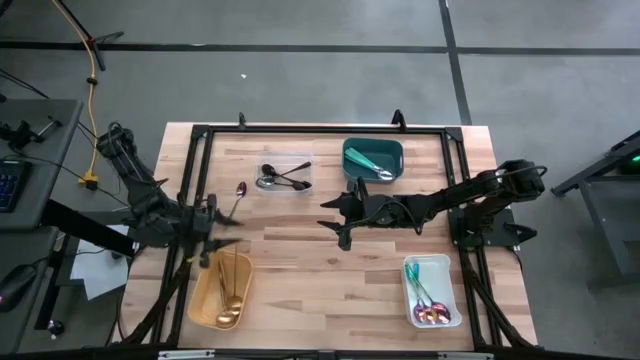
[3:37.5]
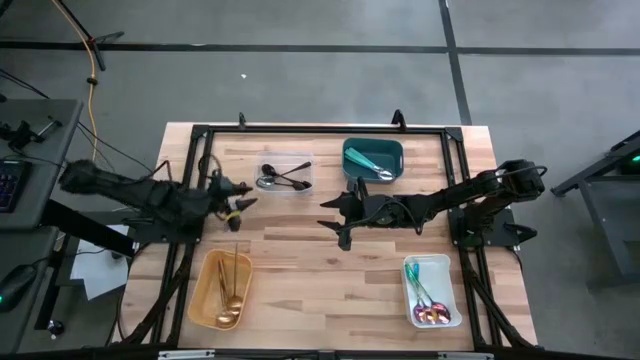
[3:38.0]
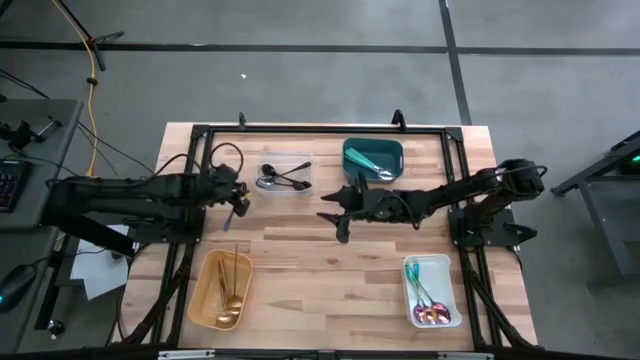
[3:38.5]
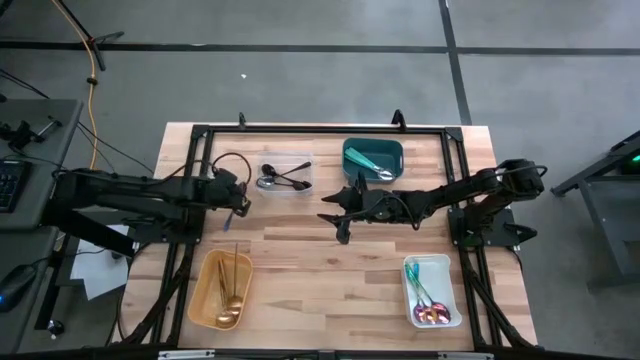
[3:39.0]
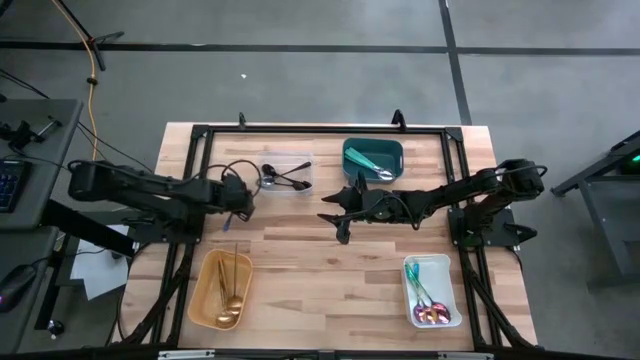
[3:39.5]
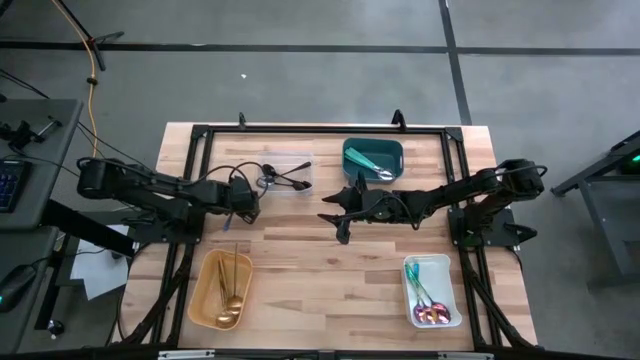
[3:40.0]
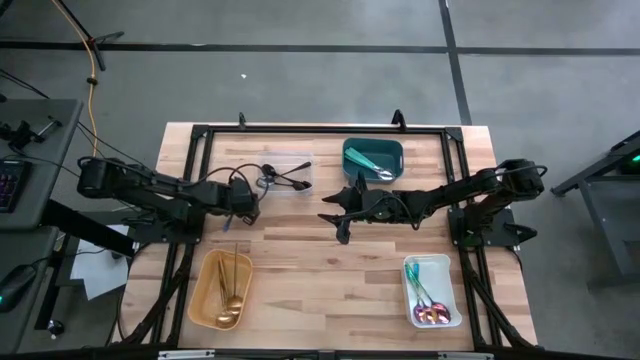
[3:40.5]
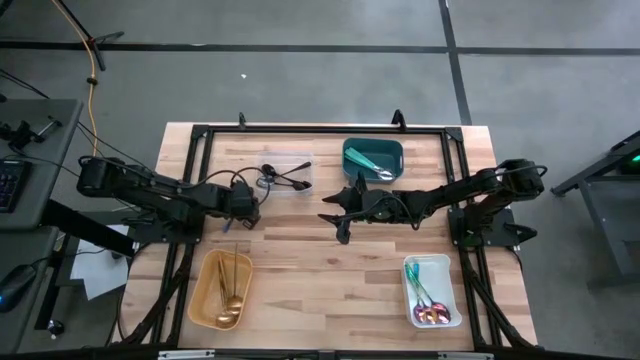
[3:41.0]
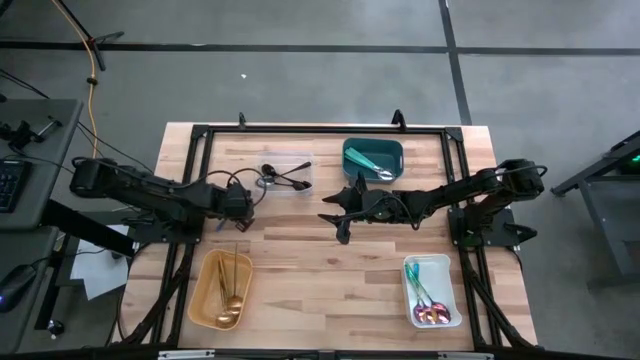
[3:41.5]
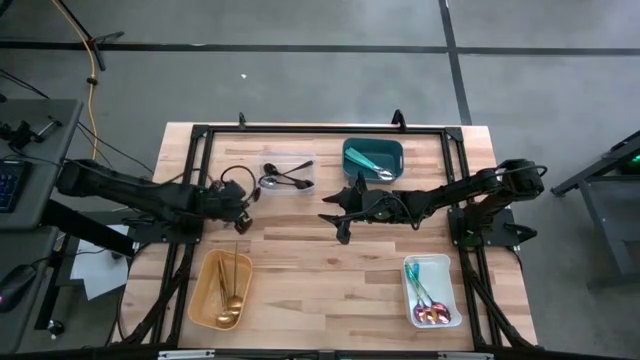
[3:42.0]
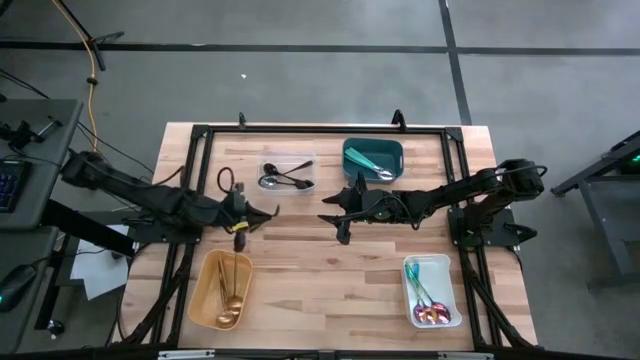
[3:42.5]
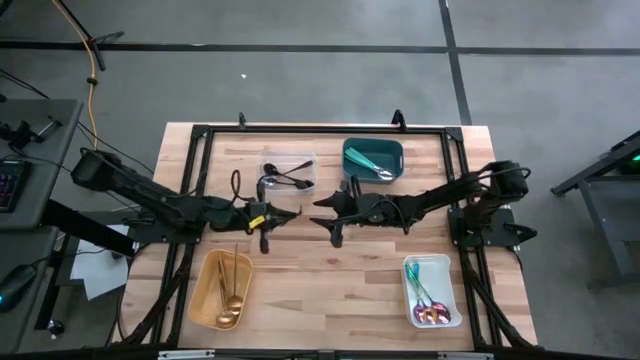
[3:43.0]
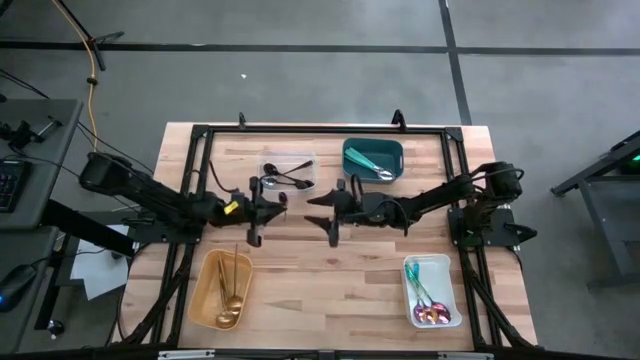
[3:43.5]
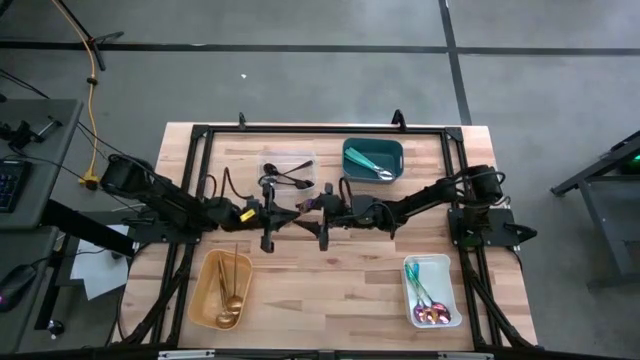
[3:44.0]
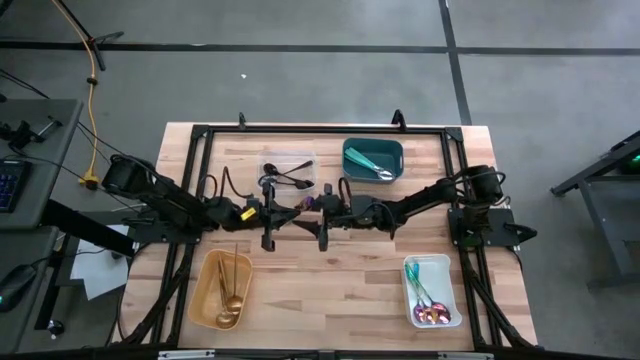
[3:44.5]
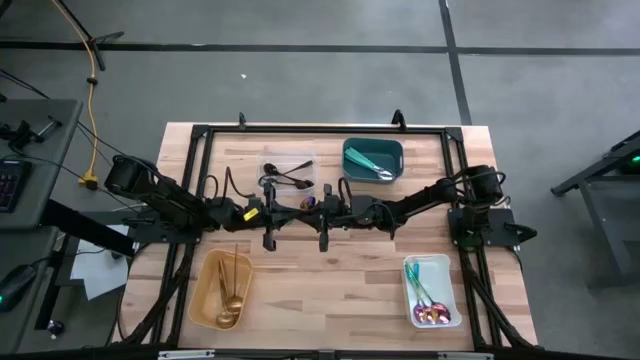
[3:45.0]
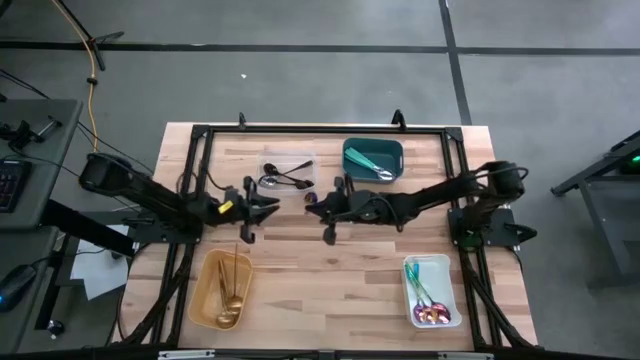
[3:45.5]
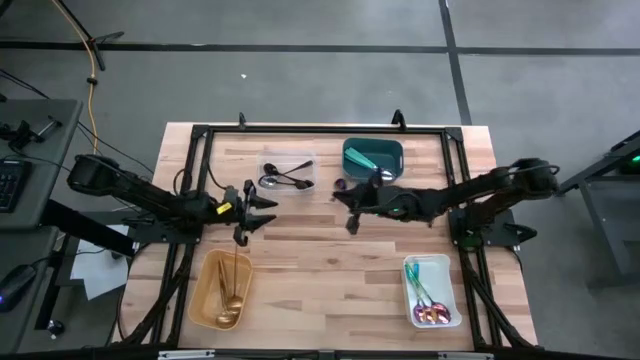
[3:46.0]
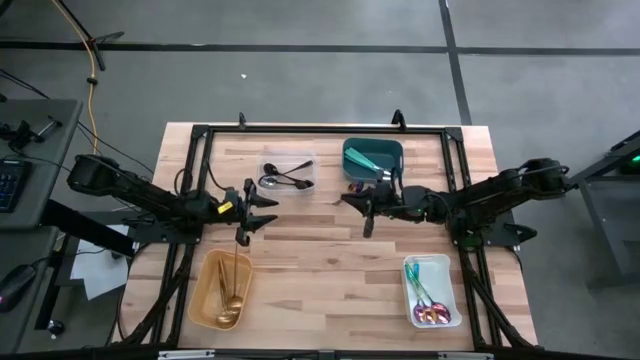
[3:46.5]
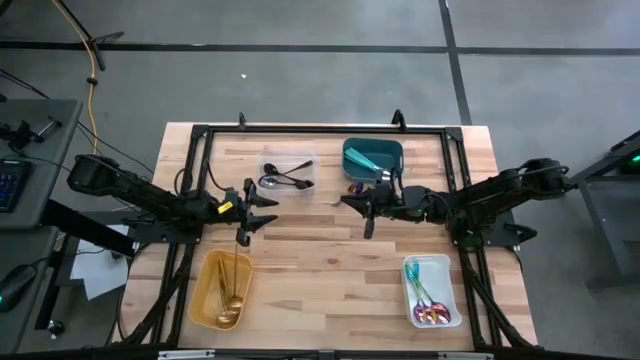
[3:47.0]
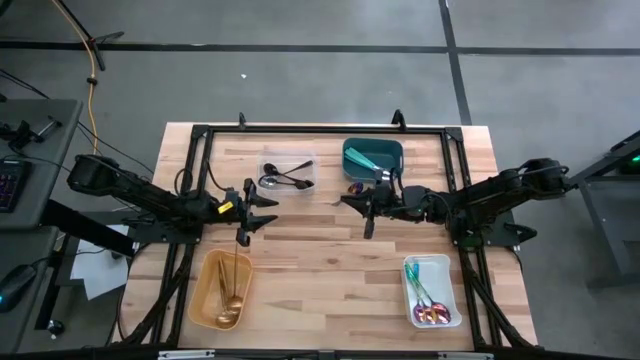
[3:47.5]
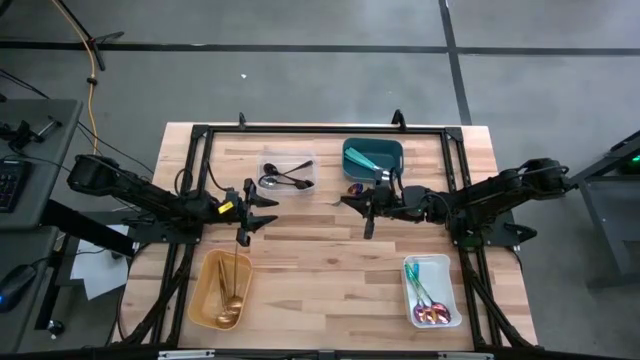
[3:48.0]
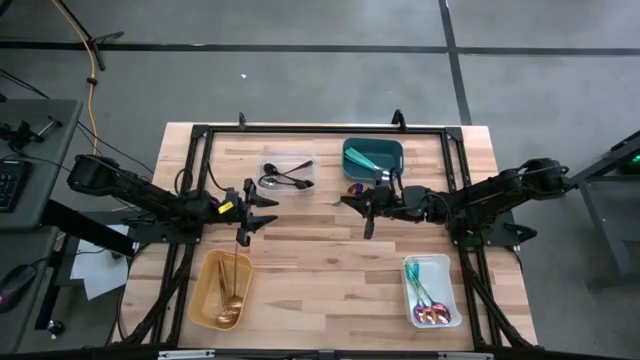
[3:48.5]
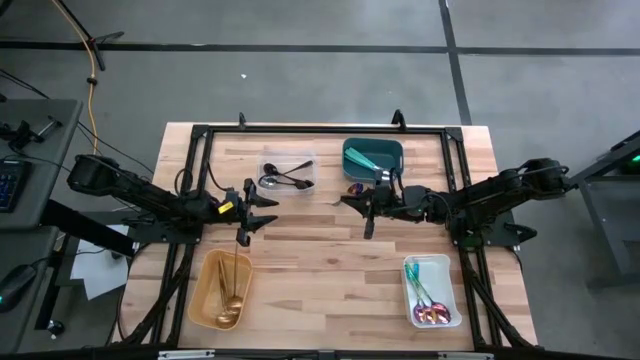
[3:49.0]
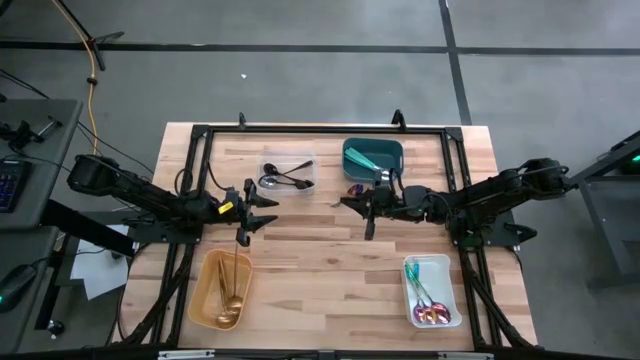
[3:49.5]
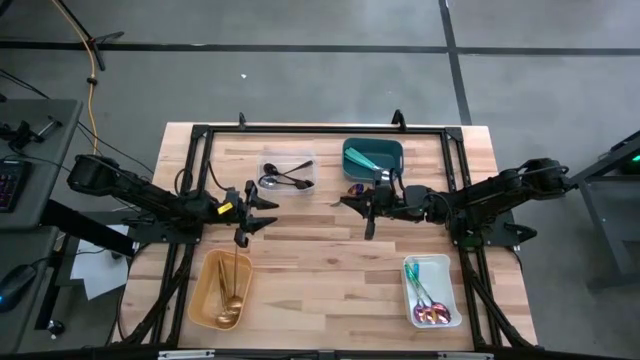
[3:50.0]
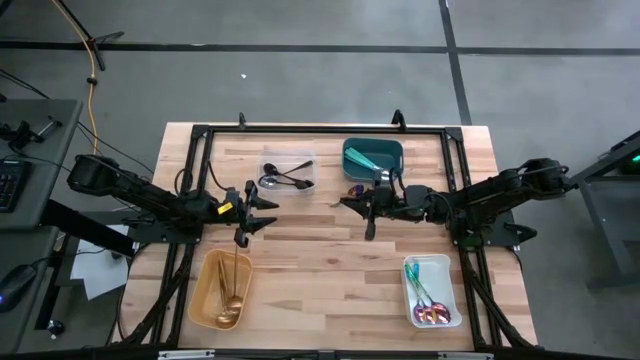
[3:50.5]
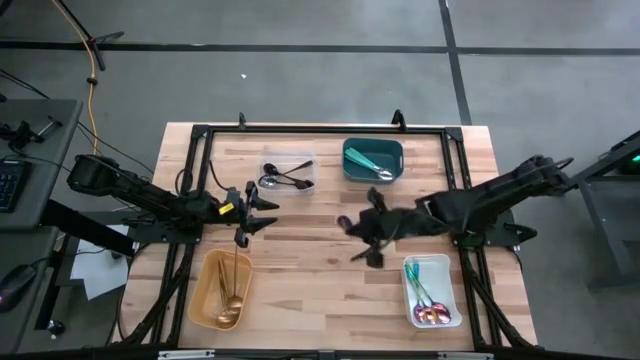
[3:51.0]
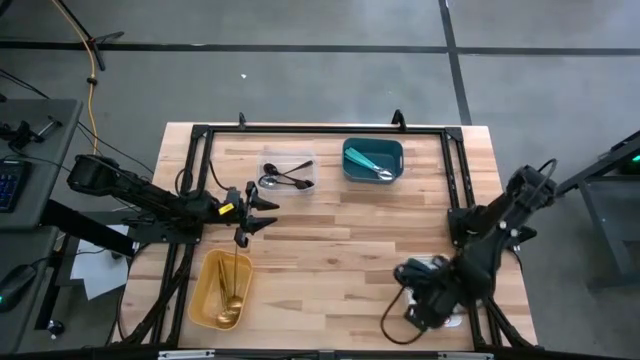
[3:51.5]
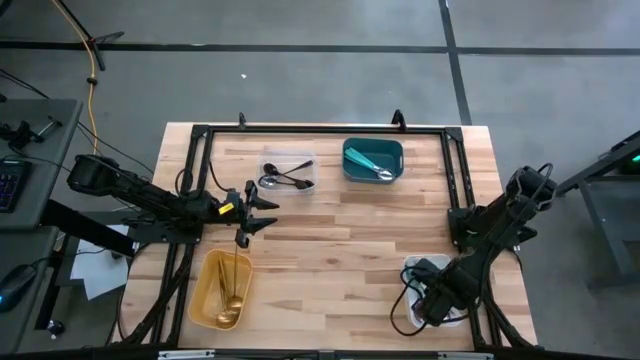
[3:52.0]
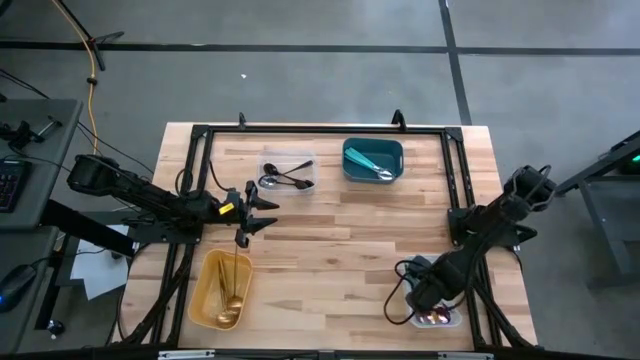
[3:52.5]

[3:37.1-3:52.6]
Task: Sort silverware by color (type)
Put the purple spoon into the white bin

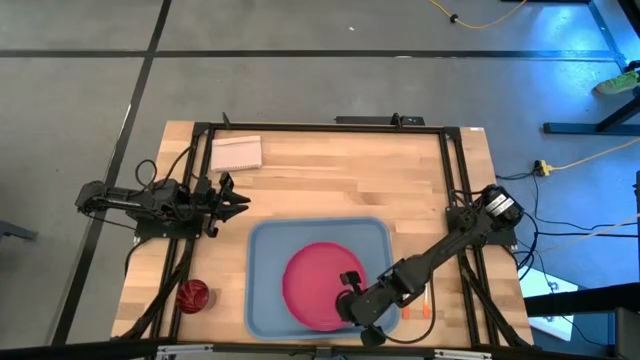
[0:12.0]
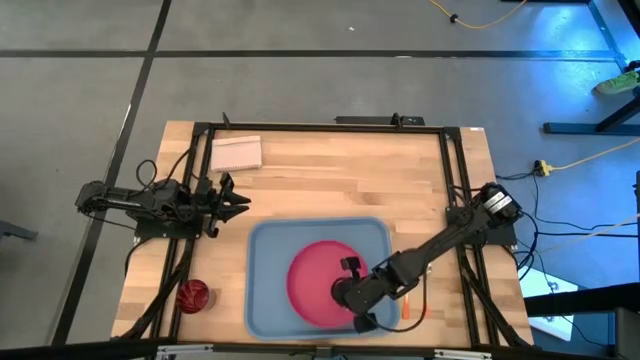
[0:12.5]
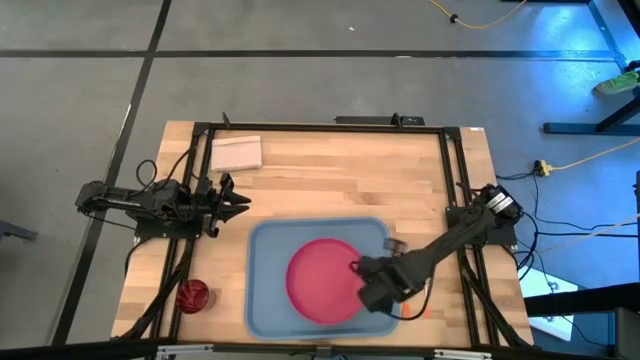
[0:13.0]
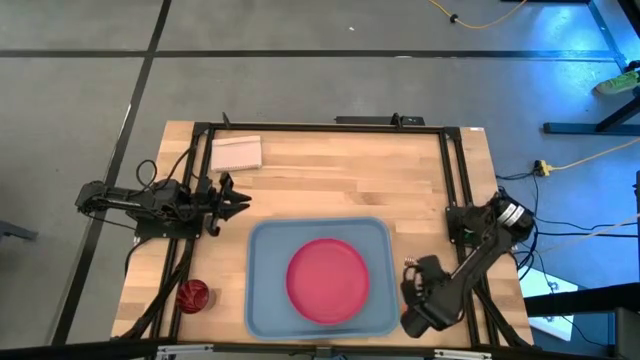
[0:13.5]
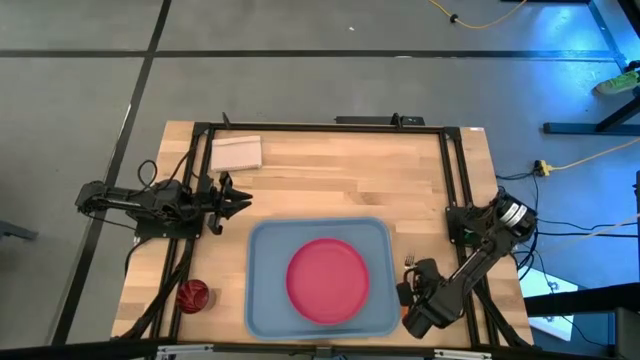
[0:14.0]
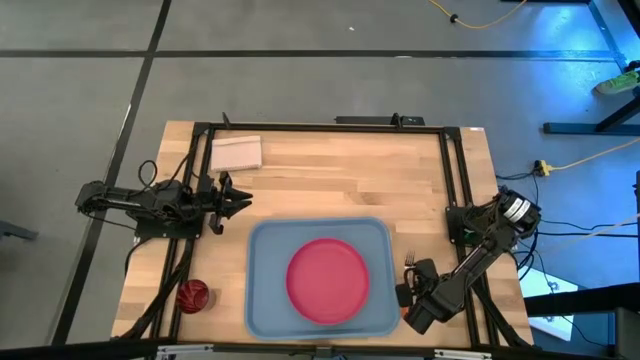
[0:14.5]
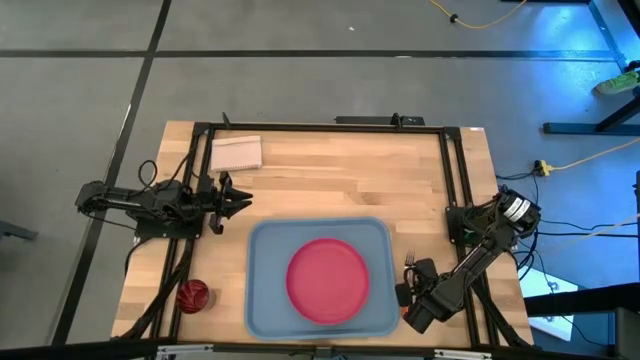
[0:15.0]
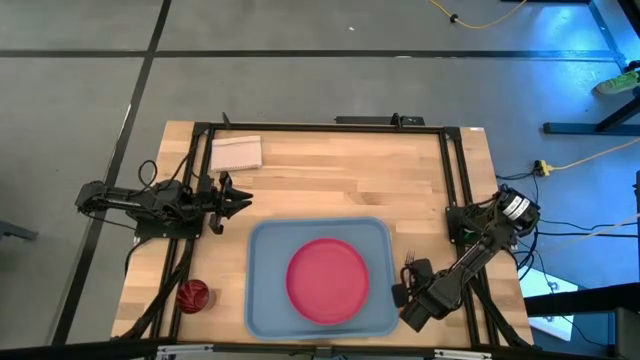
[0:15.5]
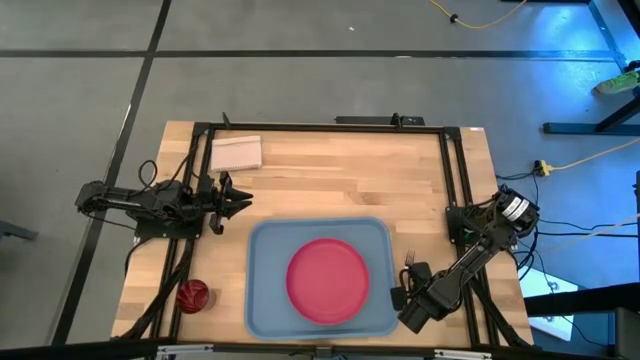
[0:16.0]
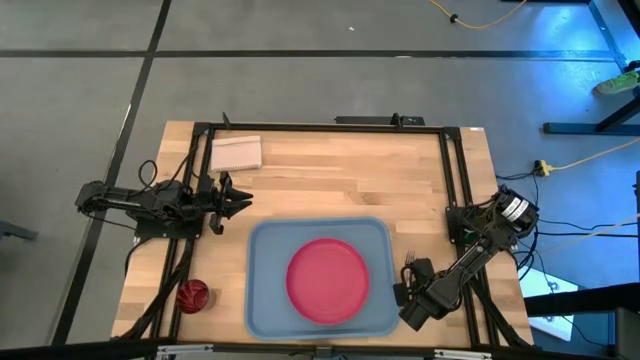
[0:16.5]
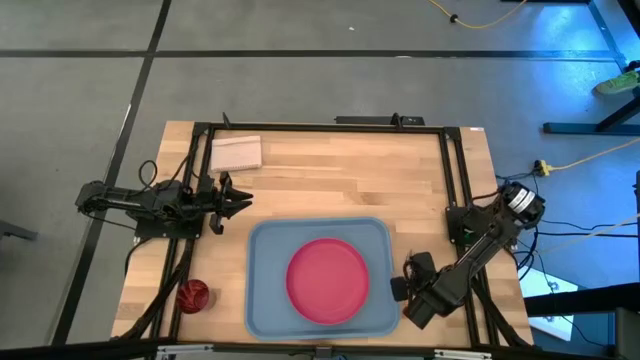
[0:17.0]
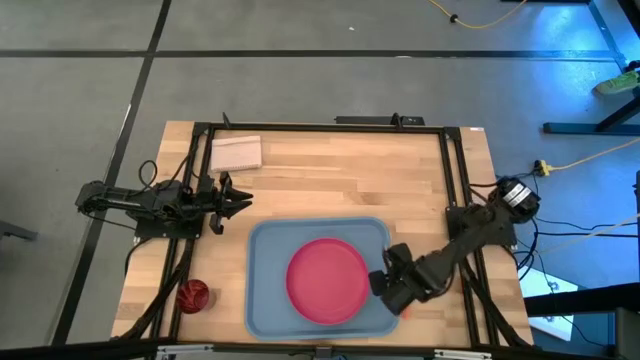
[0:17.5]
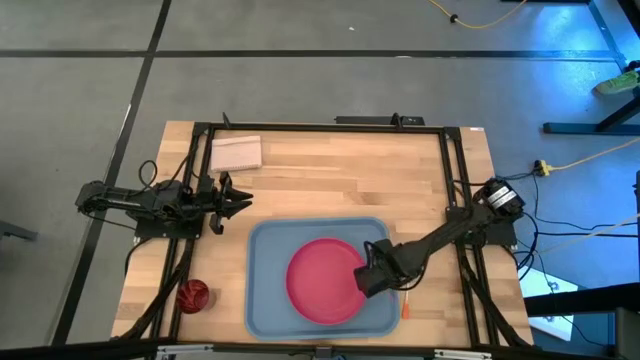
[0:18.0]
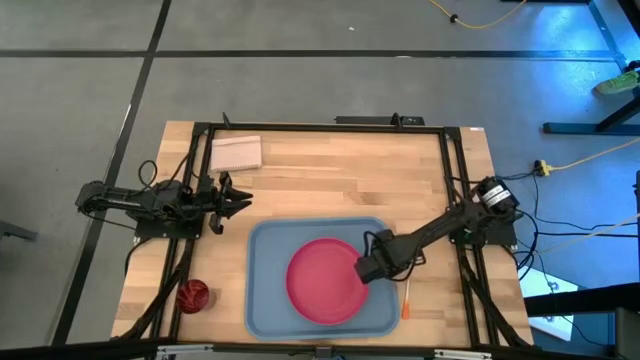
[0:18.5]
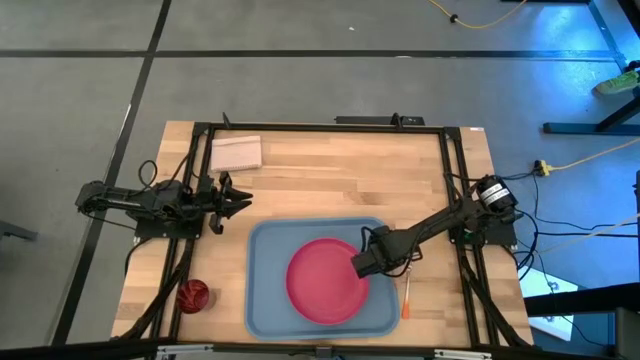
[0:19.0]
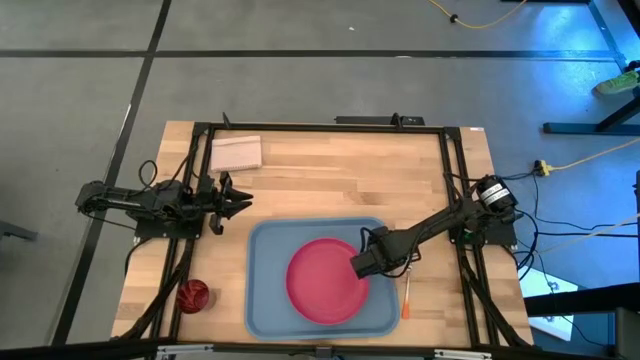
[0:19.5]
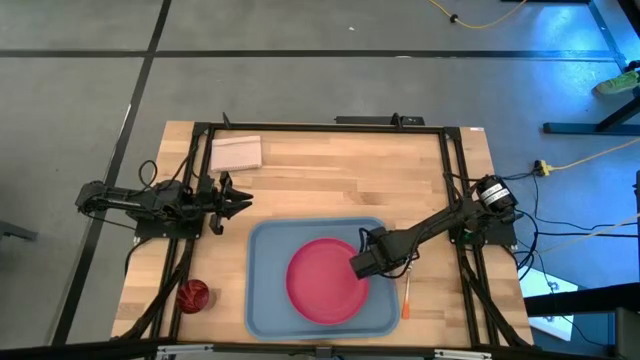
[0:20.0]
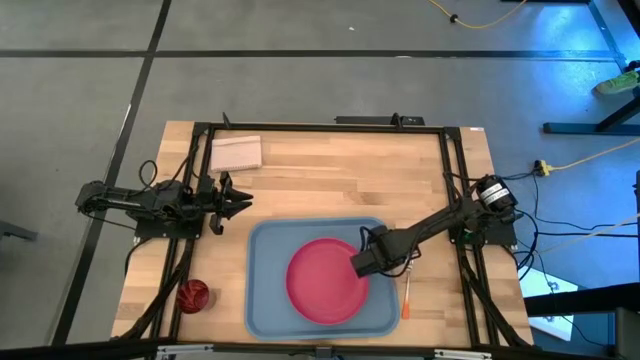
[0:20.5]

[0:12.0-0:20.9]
Task: Pick and place plate/cup/fork/spoon on tray
Put the orange spoon on the blue tray to the right of the red plate
